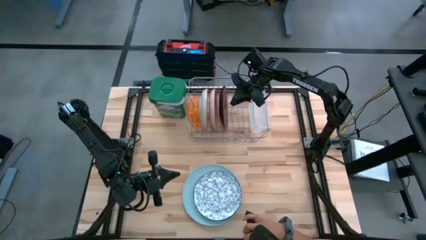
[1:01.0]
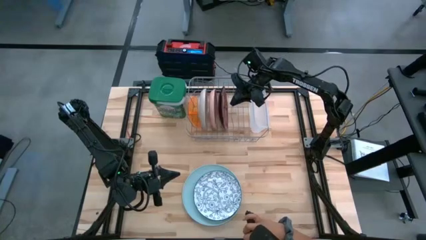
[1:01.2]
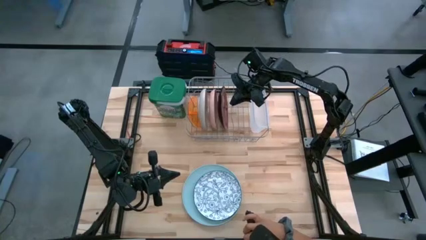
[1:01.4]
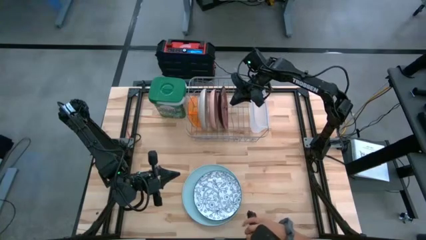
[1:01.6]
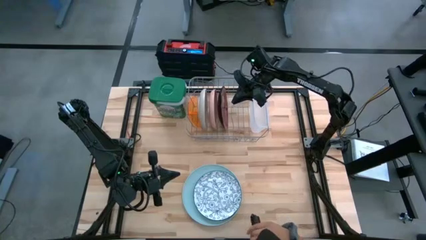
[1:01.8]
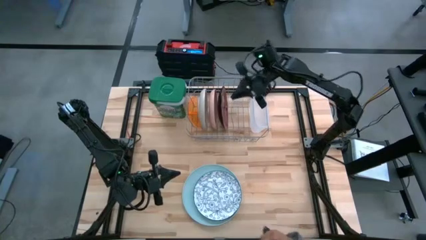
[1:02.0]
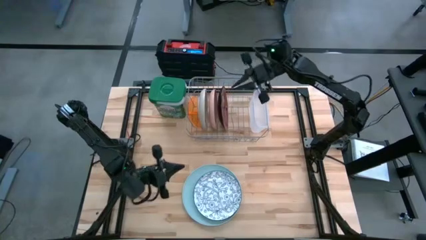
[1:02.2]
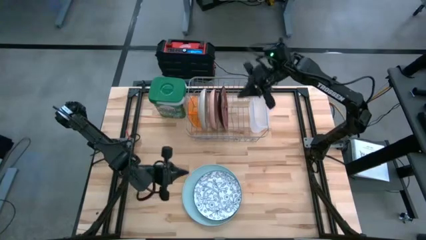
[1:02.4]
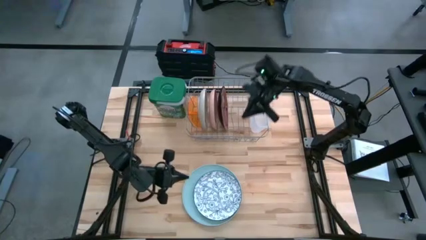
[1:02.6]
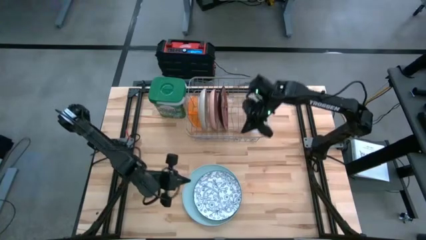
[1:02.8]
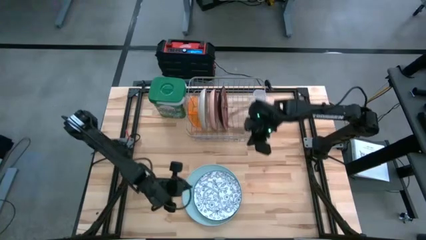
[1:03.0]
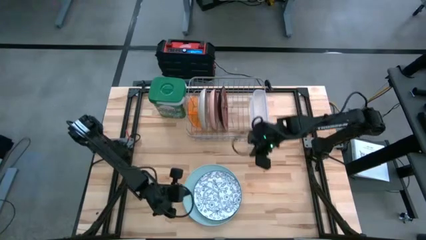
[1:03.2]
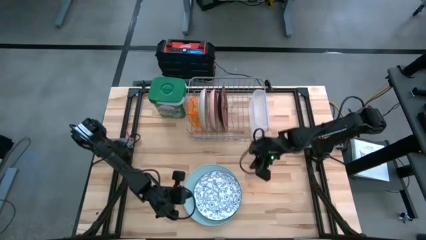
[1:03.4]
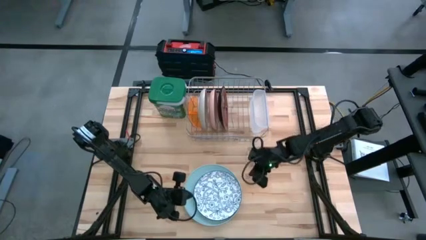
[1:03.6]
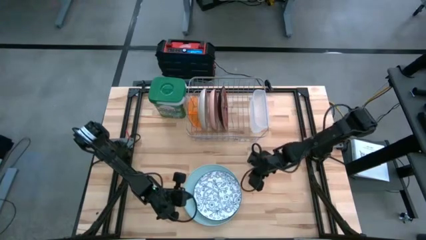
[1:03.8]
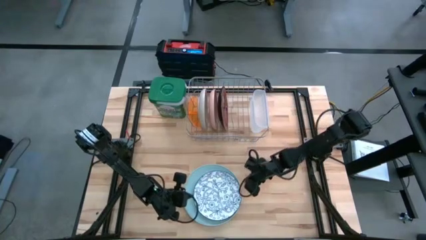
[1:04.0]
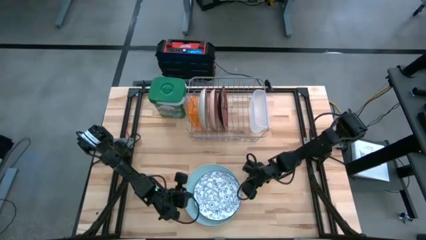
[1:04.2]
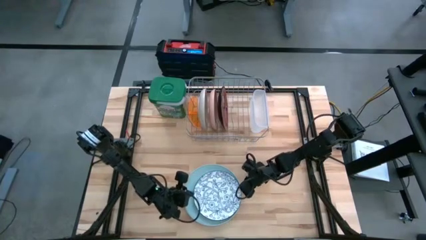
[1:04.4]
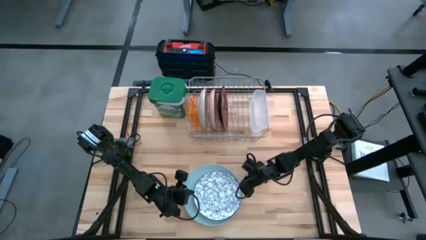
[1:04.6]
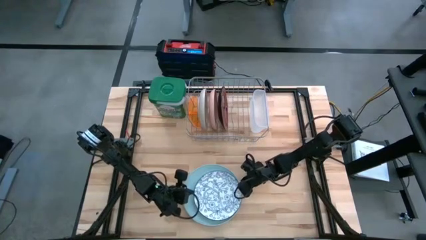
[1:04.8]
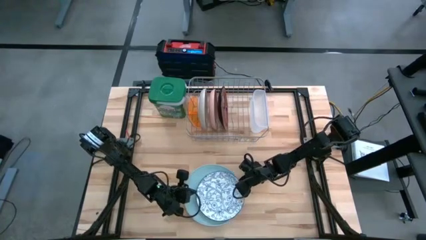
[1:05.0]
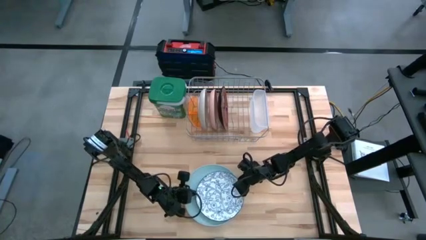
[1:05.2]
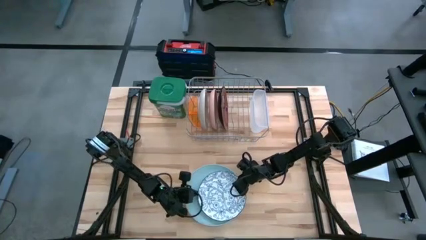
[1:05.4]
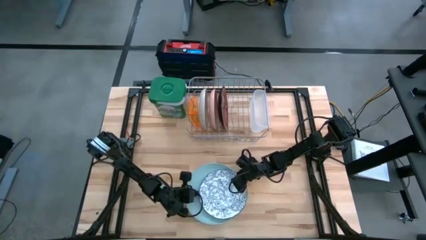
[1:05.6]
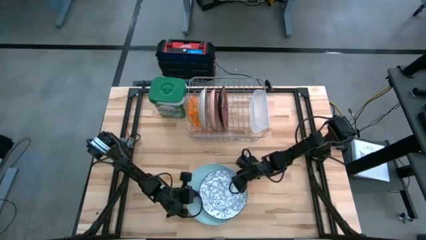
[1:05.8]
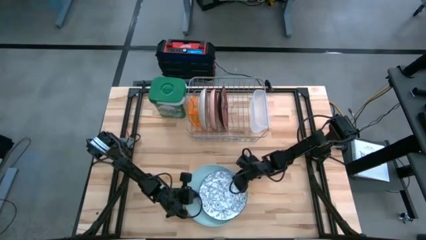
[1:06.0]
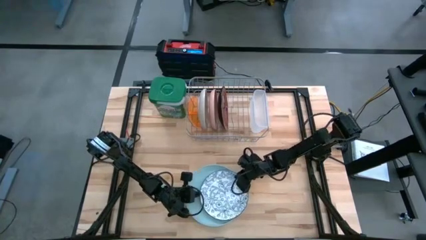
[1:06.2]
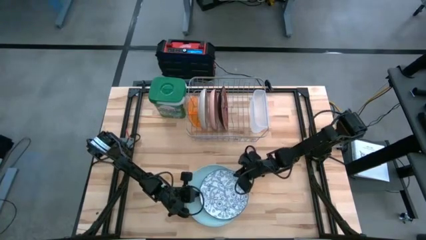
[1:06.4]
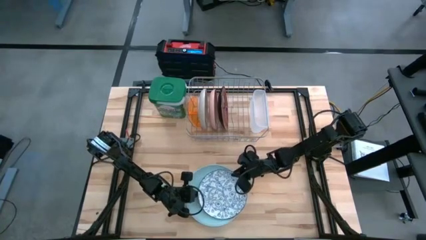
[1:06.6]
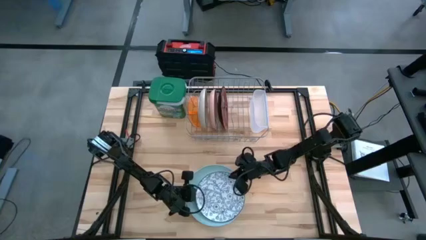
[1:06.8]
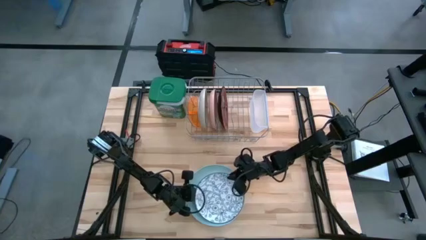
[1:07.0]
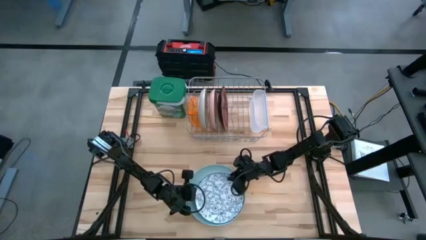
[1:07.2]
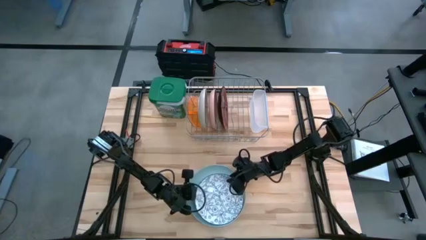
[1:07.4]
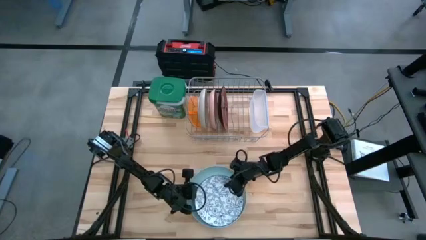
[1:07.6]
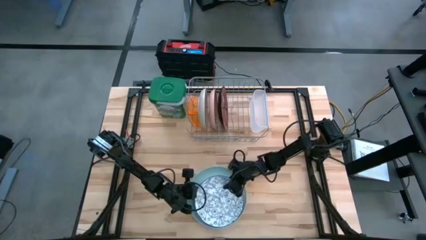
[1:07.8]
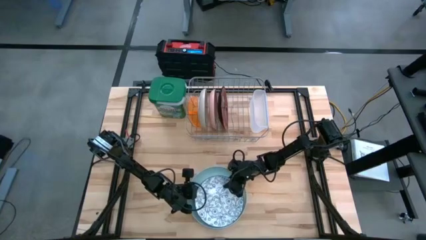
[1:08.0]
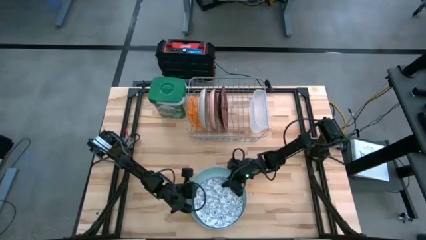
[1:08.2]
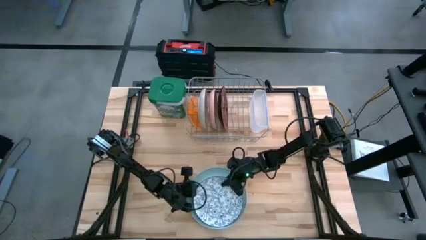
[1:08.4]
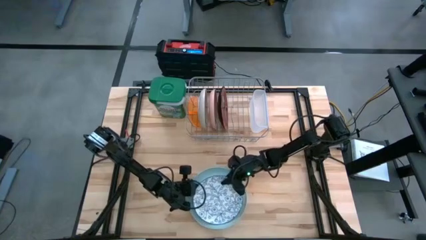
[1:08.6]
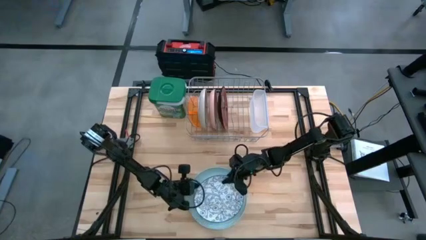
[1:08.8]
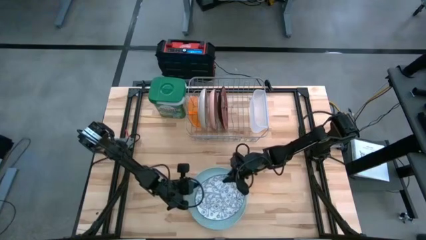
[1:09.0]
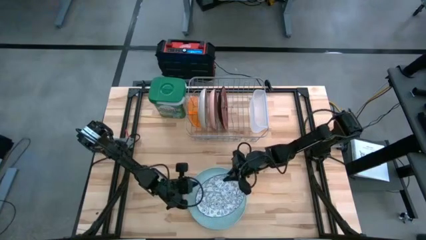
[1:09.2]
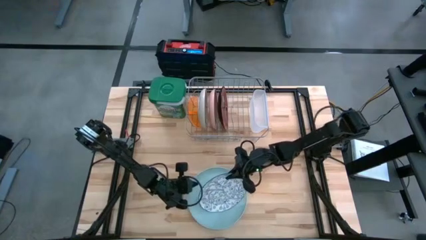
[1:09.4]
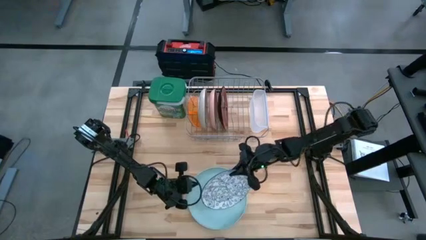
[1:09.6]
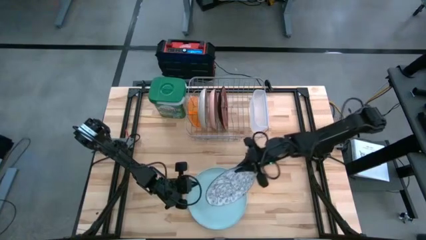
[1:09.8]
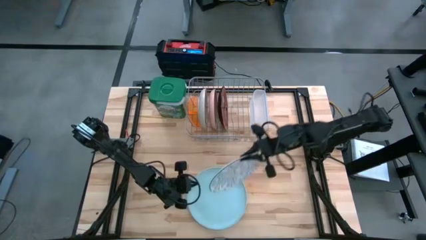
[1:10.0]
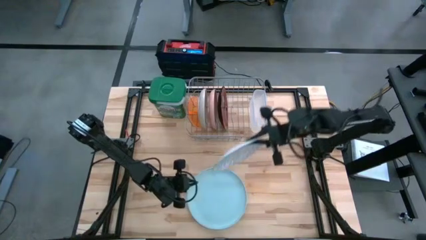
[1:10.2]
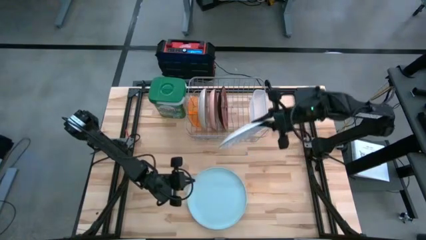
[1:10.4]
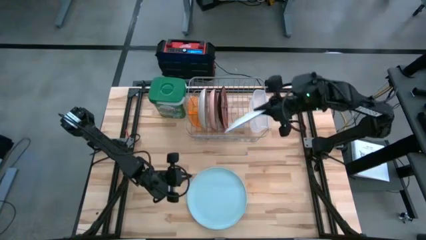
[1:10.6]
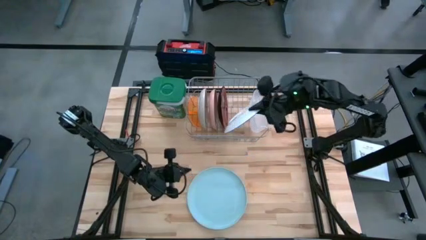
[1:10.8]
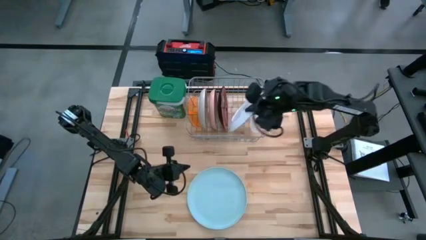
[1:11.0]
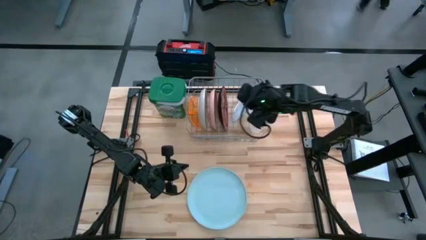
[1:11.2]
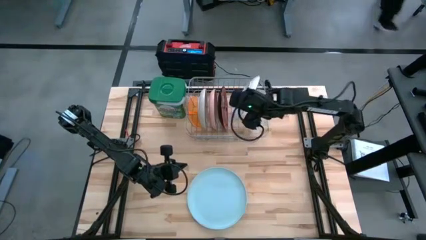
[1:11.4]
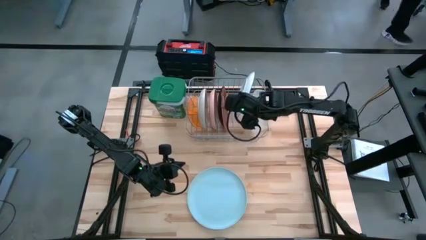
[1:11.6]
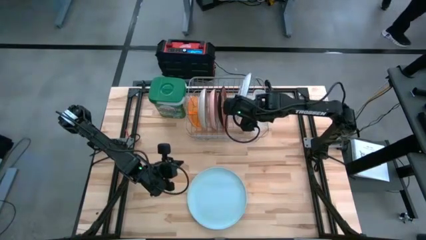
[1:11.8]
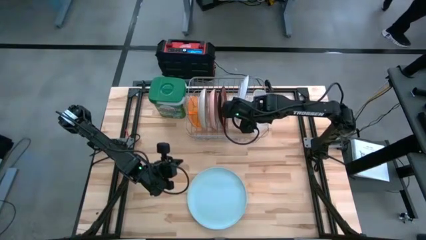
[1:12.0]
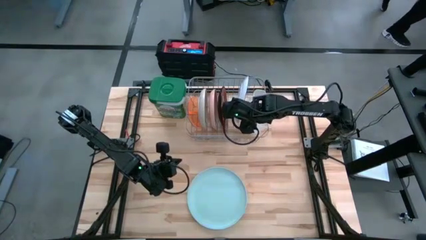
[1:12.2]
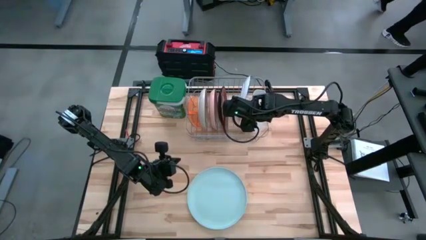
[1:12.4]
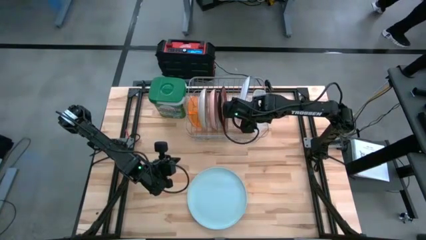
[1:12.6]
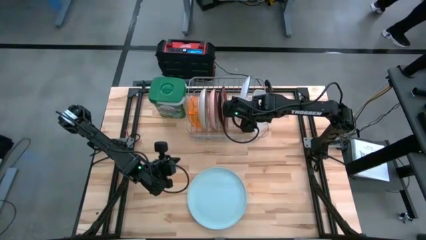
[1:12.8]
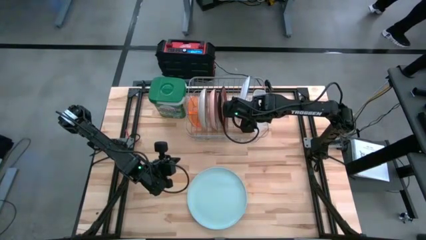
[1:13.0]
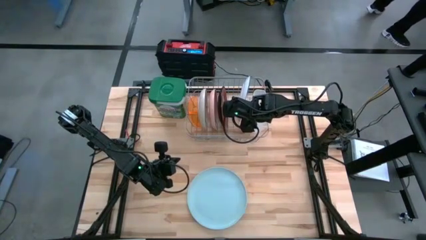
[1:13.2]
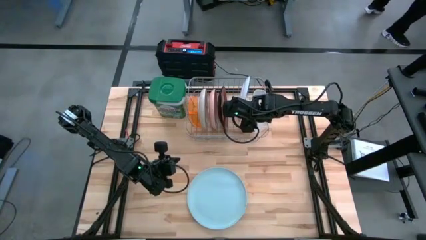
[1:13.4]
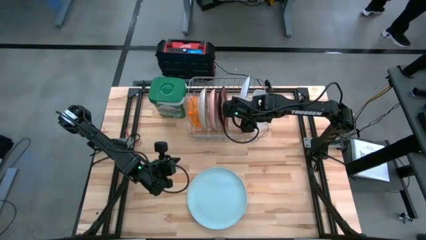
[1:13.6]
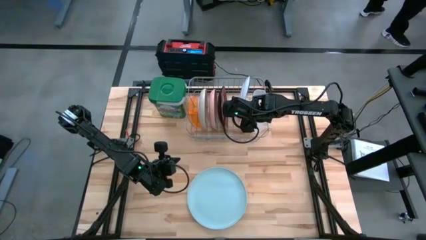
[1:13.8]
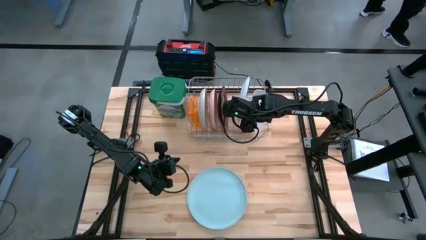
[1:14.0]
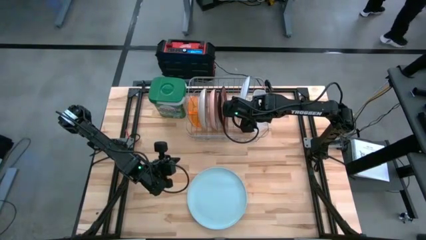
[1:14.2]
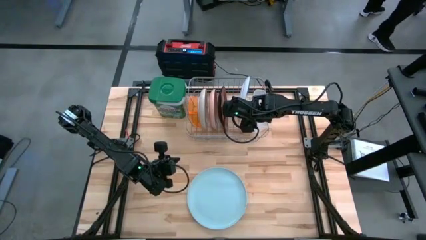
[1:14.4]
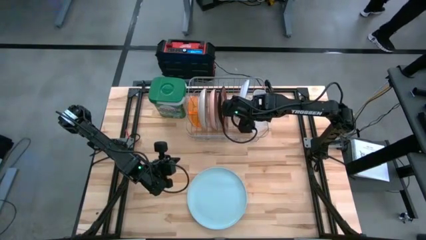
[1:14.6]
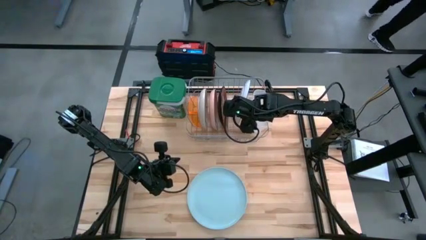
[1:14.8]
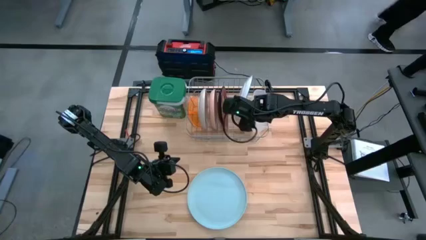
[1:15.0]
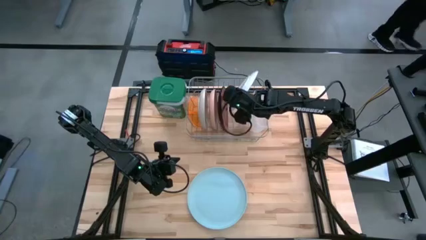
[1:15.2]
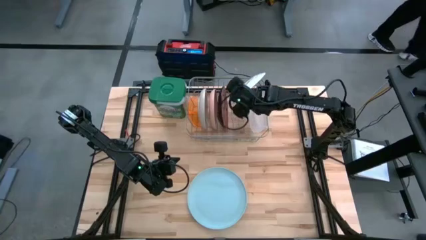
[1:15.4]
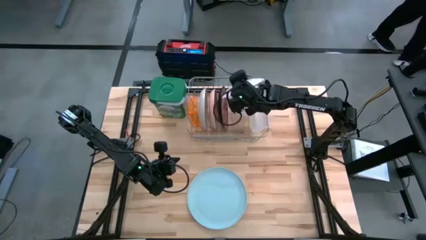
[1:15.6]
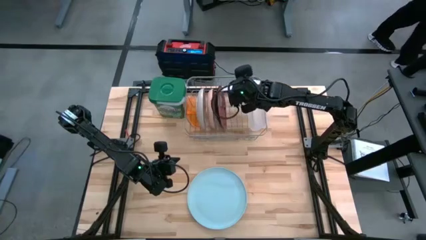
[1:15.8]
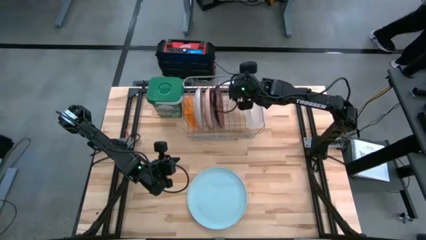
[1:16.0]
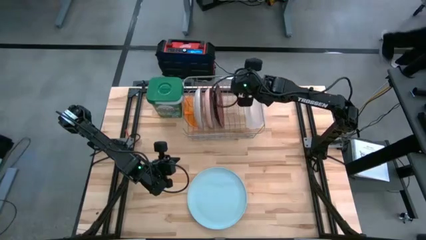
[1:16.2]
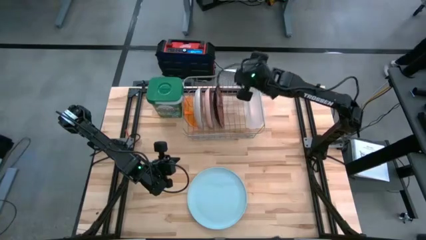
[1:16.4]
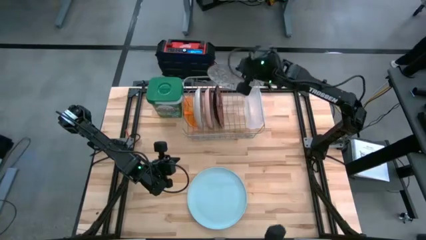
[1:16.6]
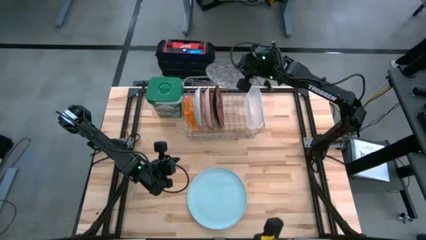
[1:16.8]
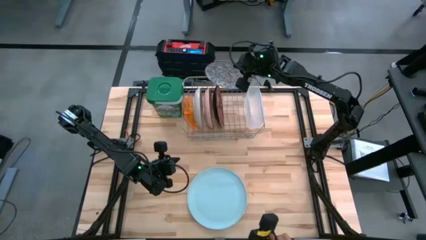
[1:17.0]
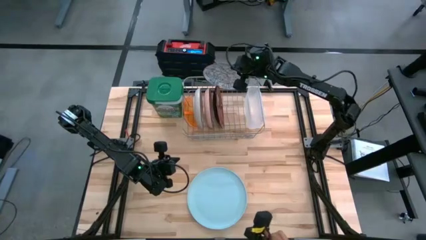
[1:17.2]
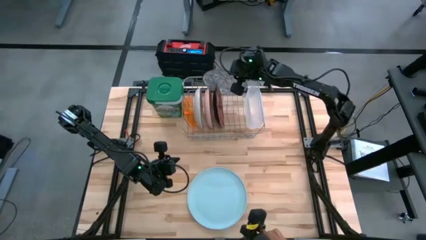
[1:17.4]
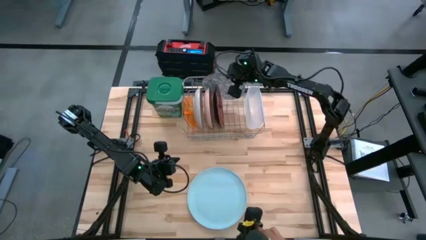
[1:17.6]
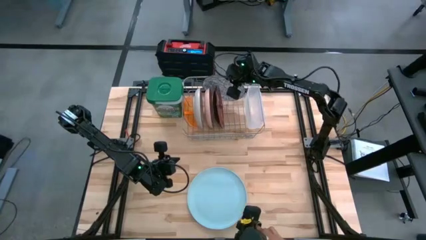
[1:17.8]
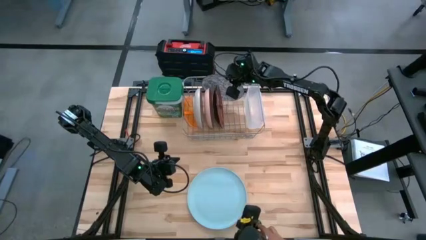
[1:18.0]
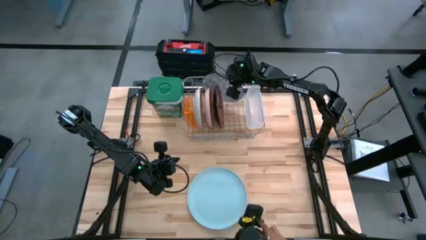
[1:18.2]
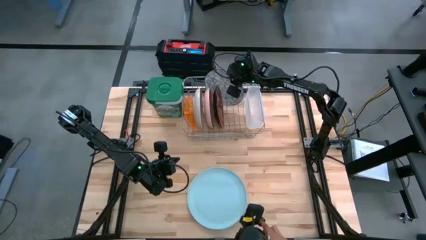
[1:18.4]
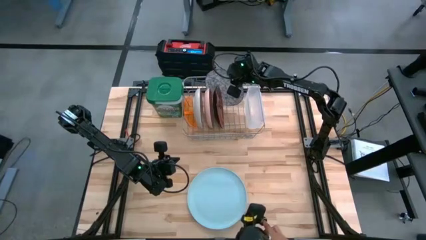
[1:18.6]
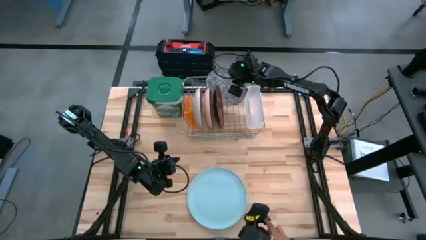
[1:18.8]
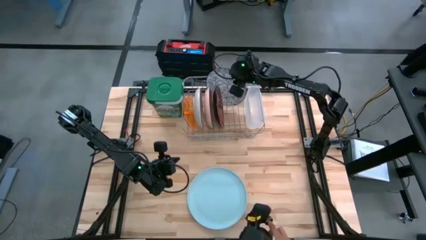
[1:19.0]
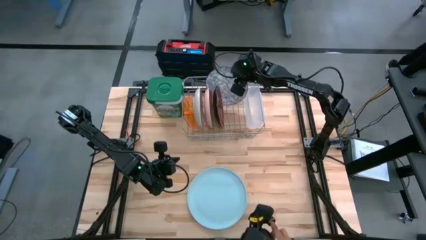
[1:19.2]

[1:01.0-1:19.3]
Task: Sort dishes
Put the white decorated plate in the dishwasher rack
